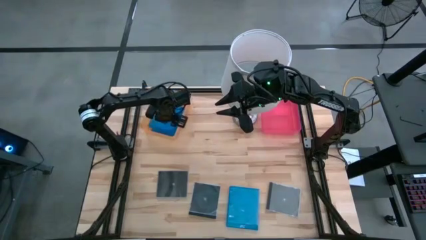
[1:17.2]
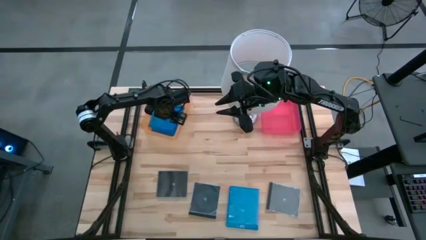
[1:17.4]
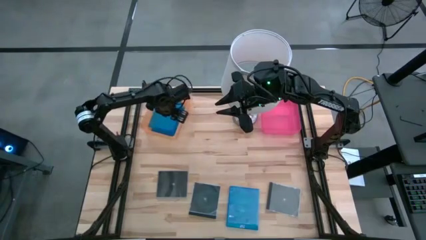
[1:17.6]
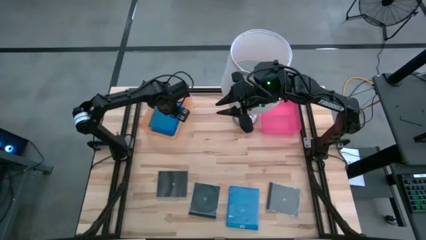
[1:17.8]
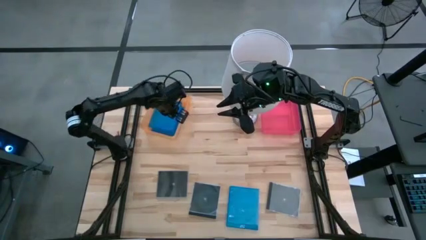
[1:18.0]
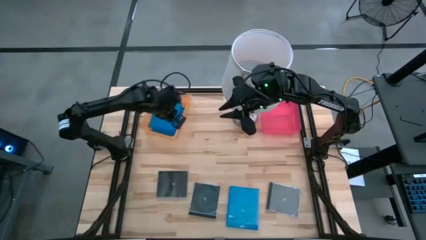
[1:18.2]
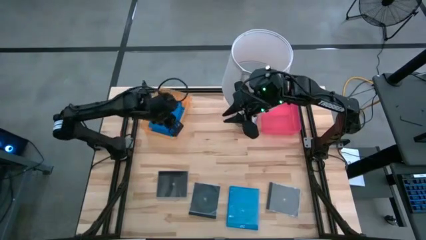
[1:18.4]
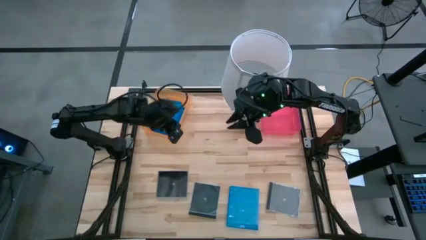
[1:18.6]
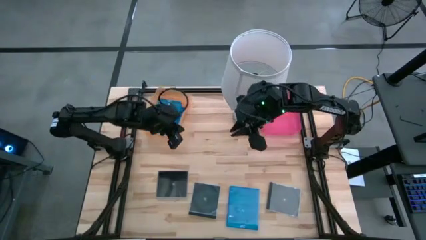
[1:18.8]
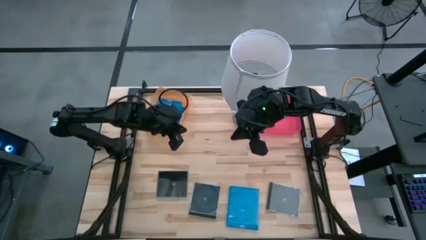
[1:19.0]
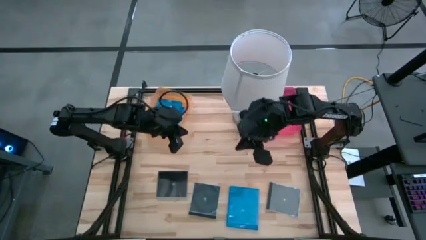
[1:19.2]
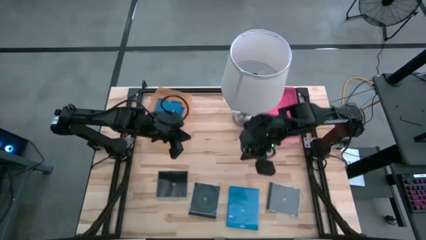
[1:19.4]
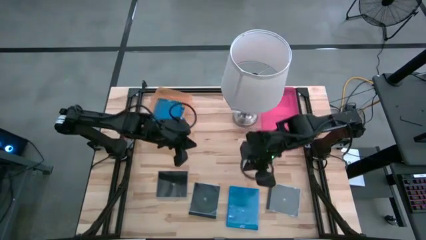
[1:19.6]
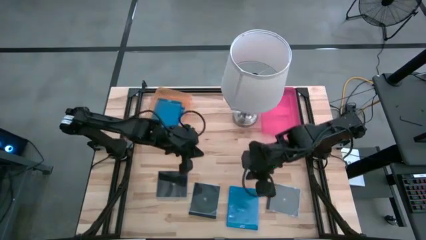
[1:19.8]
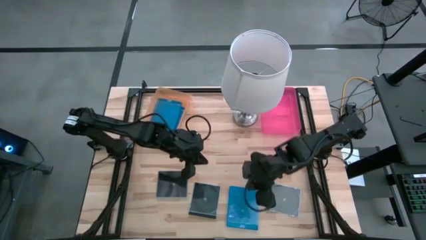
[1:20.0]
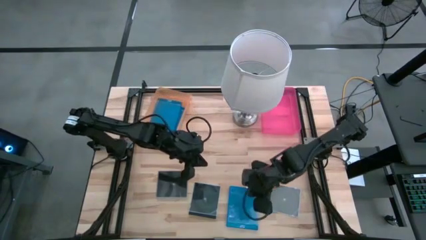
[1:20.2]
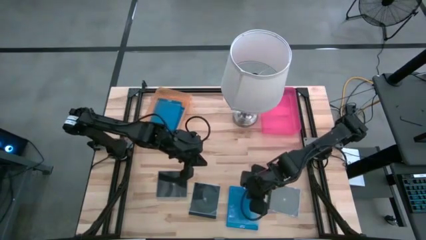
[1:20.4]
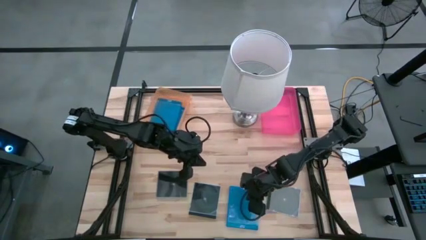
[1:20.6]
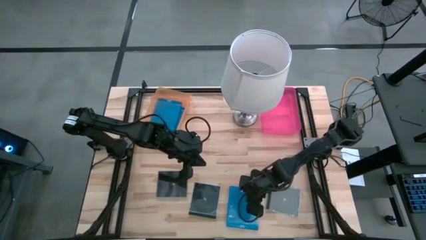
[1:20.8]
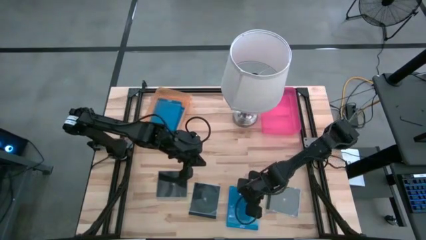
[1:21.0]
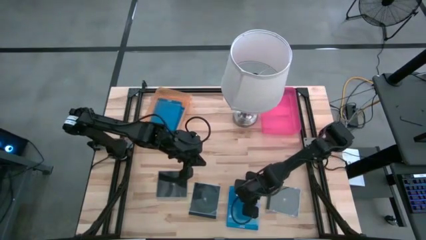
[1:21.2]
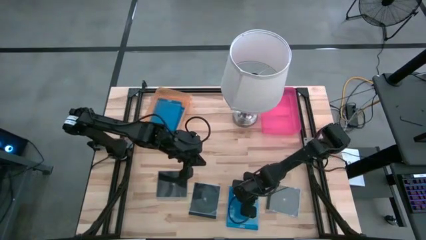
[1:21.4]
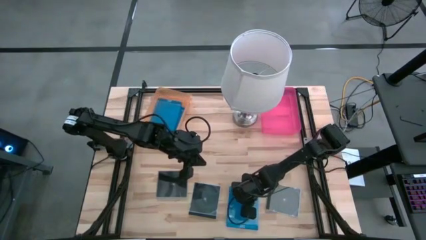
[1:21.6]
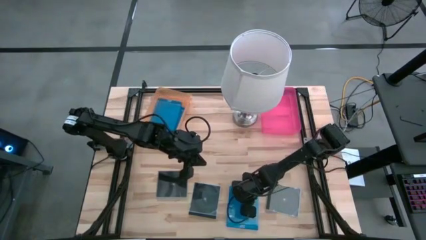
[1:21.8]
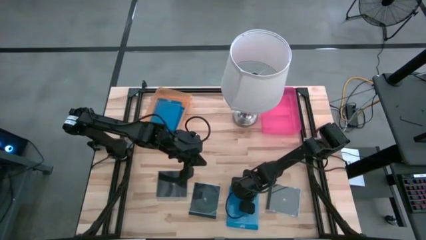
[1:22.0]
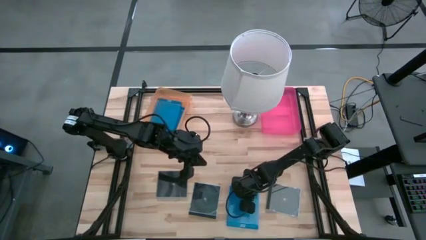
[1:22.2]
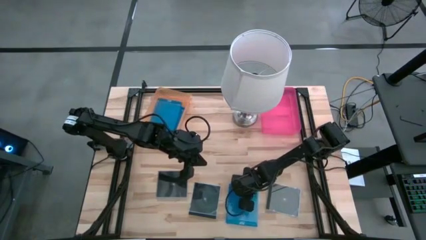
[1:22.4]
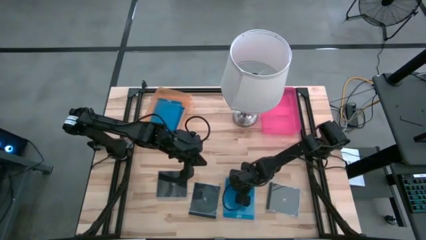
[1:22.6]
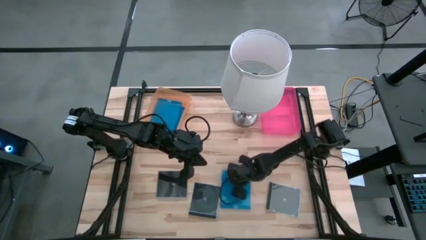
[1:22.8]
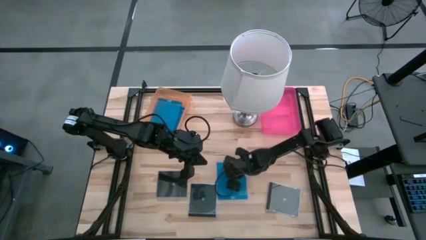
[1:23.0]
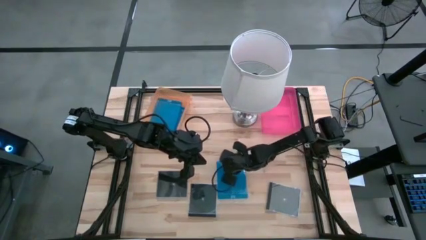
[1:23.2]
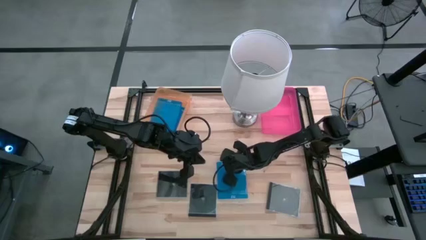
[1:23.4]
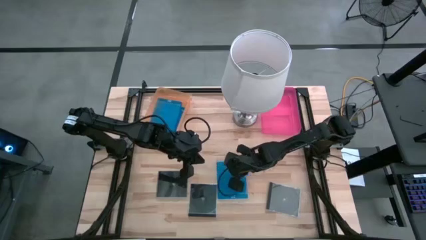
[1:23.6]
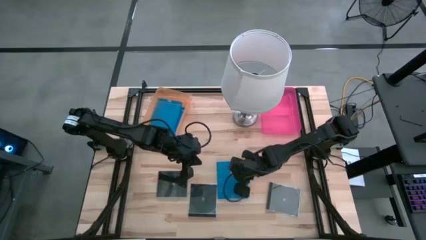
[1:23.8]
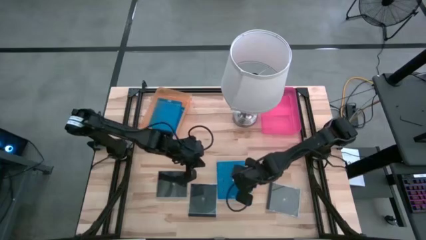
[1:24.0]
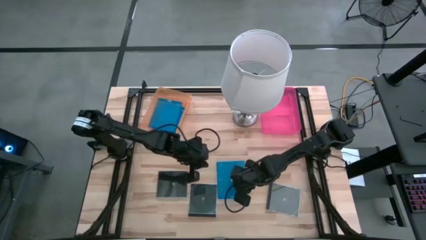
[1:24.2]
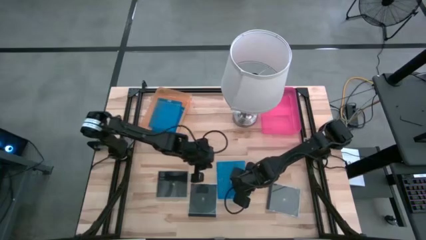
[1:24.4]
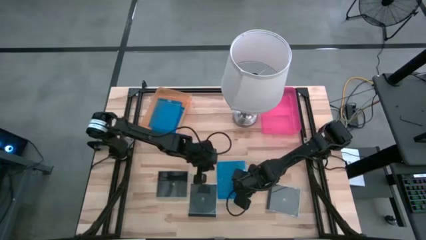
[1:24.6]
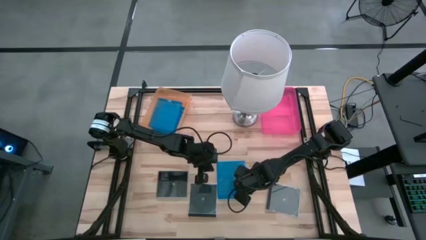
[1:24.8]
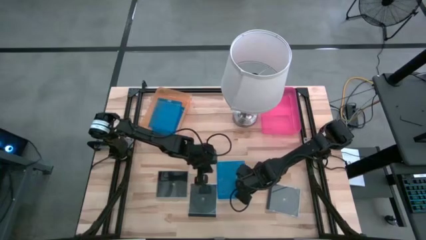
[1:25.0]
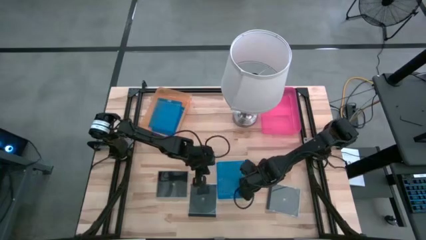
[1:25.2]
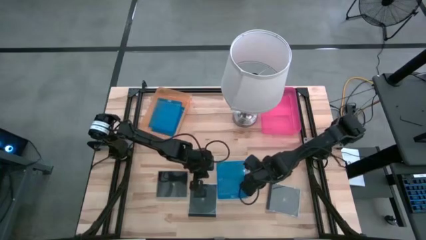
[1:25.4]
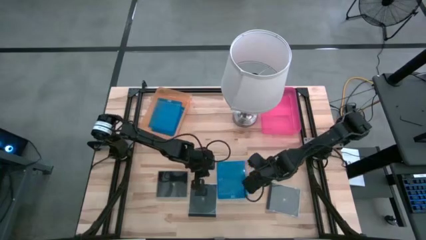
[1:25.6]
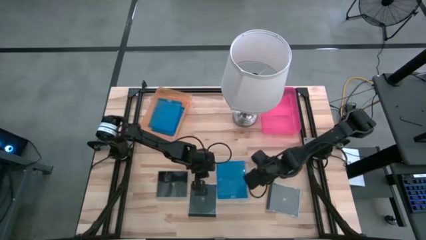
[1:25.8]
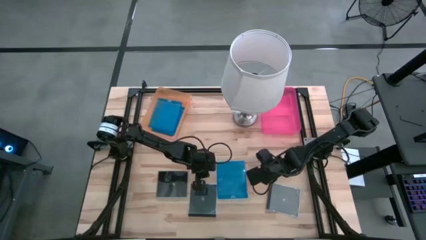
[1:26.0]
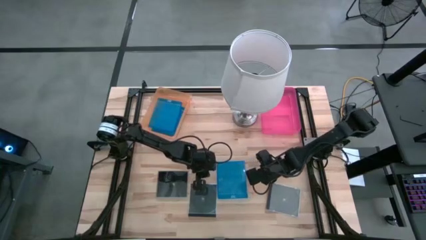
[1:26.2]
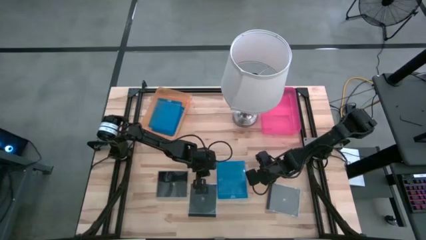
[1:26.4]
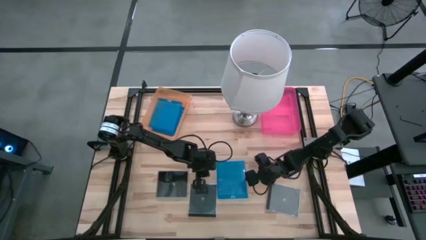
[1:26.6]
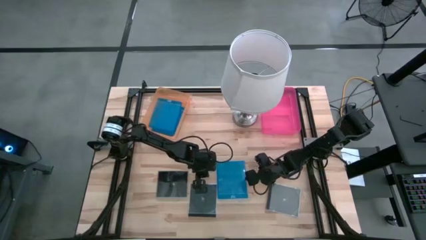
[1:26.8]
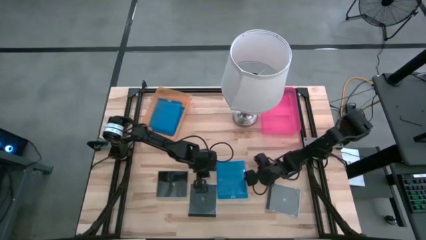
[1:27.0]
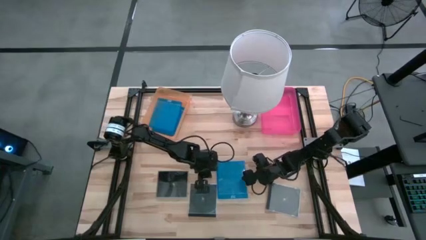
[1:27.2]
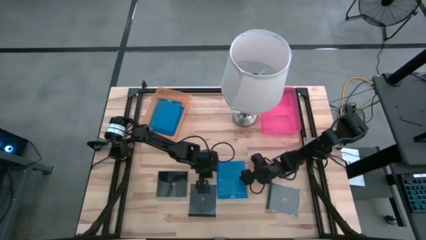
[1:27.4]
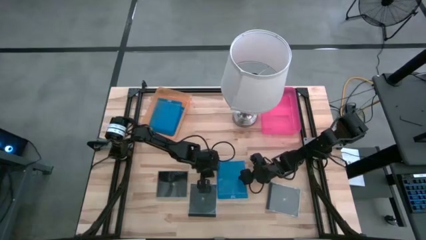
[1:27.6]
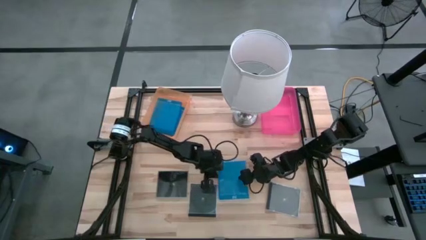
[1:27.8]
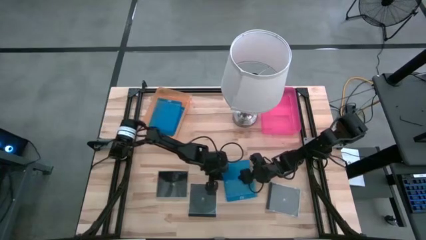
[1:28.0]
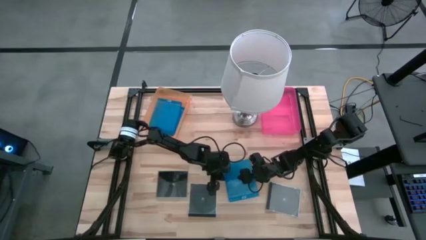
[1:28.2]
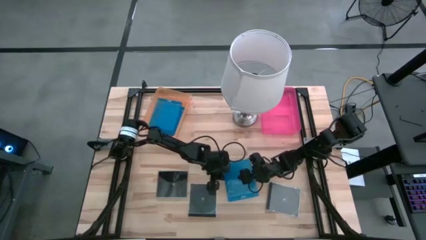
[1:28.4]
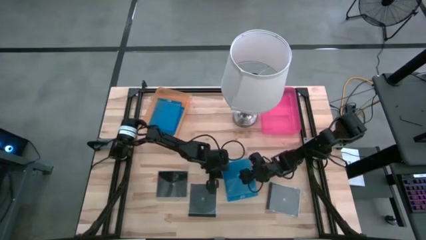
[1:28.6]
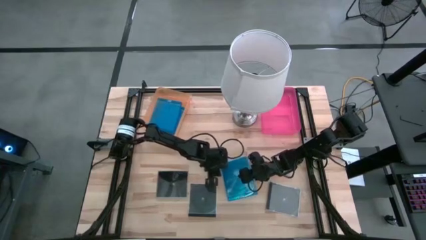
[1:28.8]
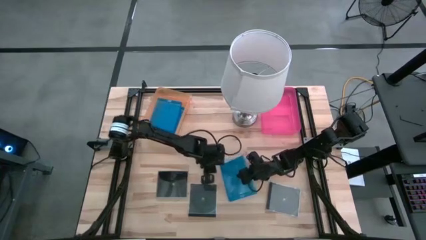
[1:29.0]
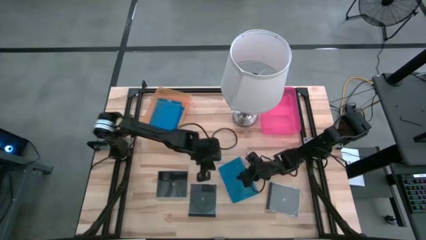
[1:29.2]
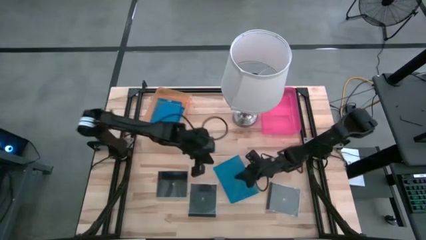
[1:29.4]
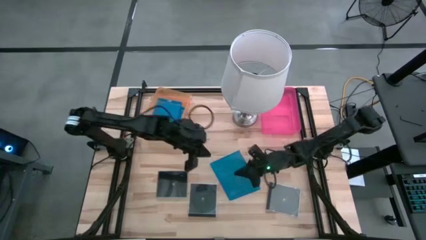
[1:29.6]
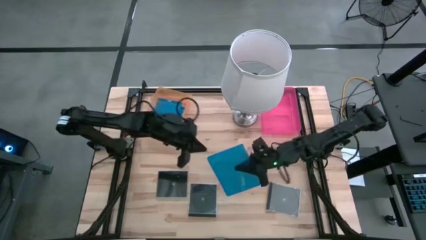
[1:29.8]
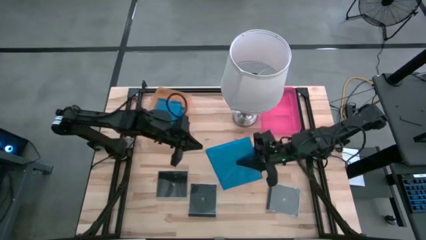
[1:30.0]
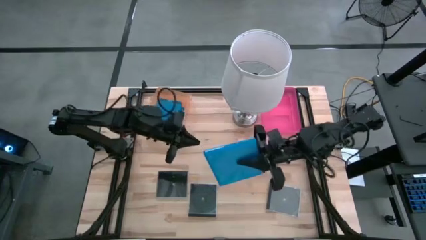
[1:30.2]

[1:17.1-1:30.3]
Task: Pick & place jewel cases by type
Put the blue cd case into the orange bin
